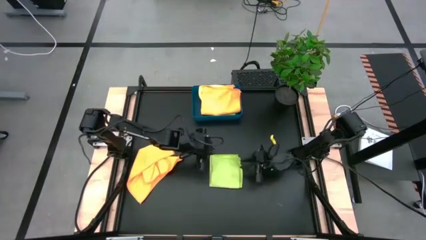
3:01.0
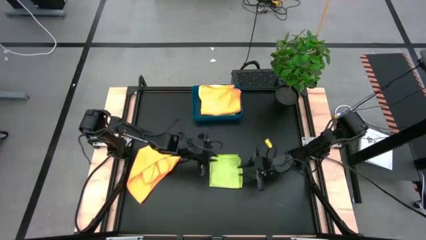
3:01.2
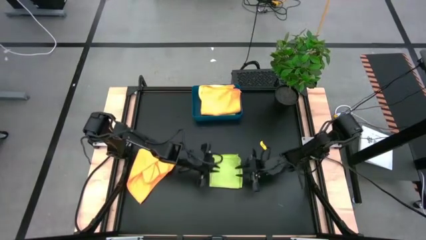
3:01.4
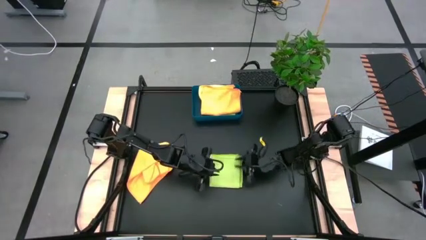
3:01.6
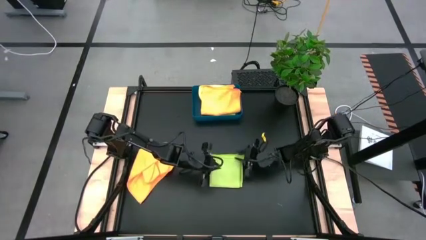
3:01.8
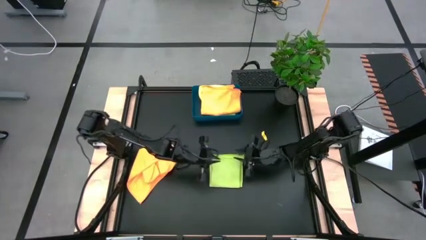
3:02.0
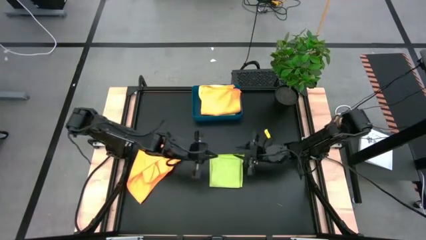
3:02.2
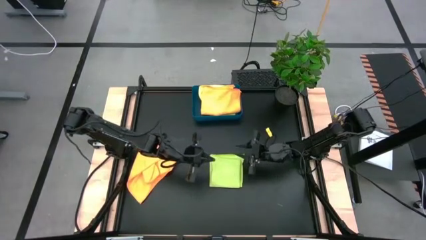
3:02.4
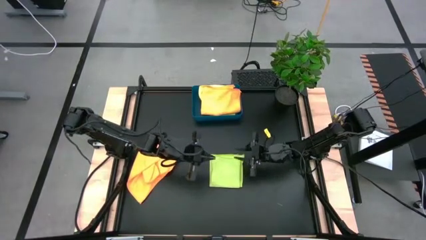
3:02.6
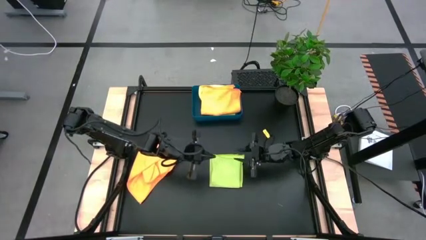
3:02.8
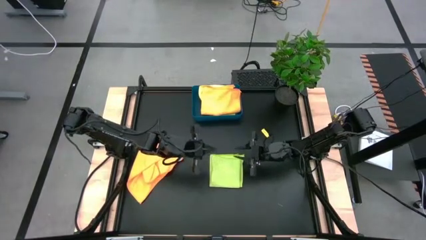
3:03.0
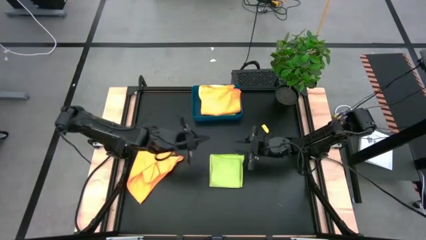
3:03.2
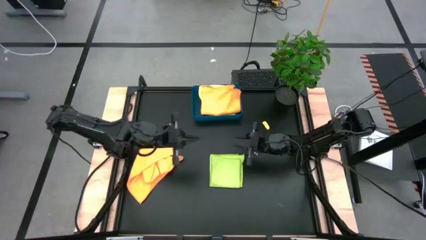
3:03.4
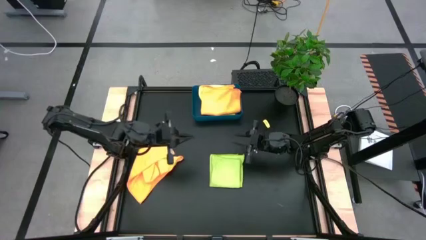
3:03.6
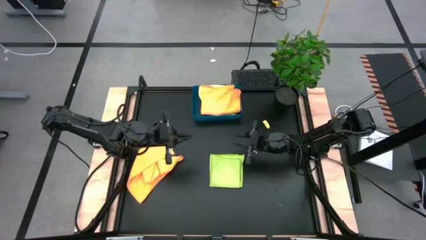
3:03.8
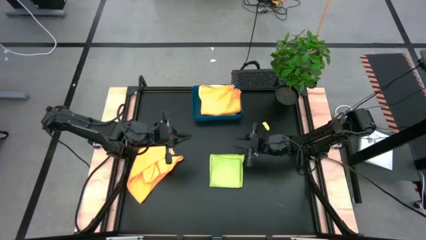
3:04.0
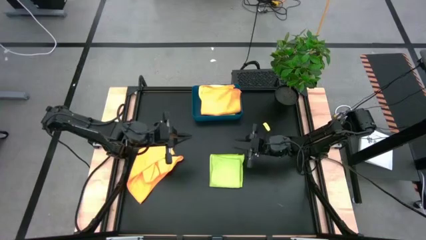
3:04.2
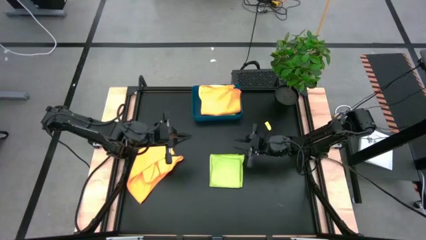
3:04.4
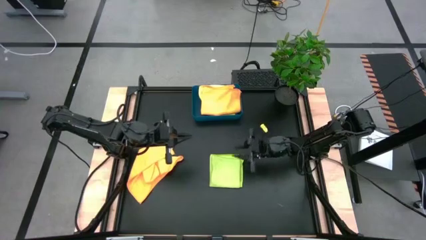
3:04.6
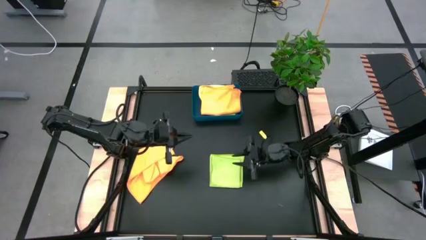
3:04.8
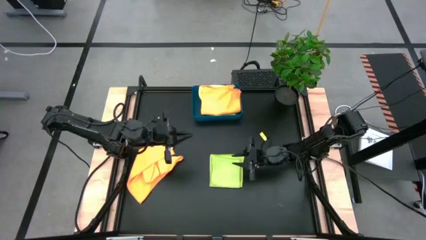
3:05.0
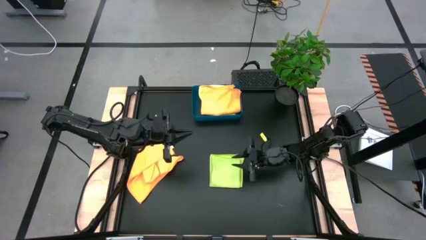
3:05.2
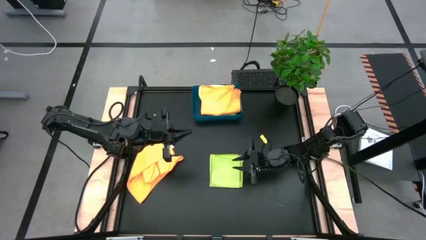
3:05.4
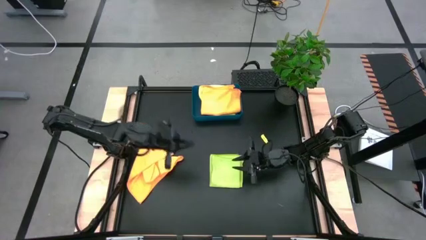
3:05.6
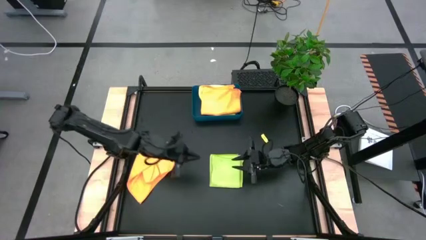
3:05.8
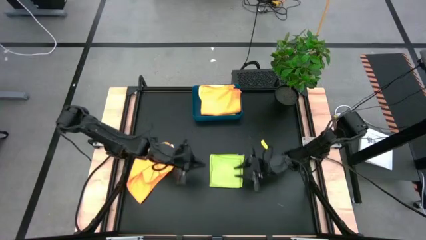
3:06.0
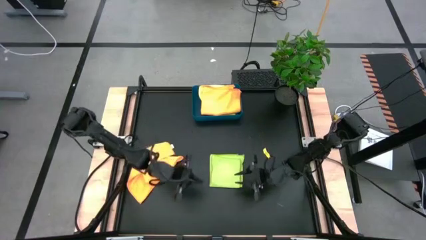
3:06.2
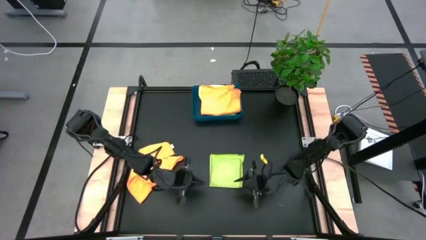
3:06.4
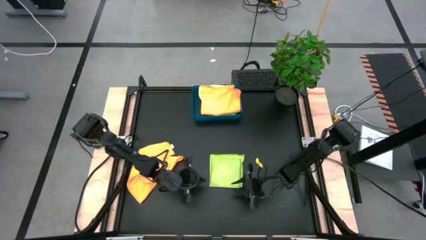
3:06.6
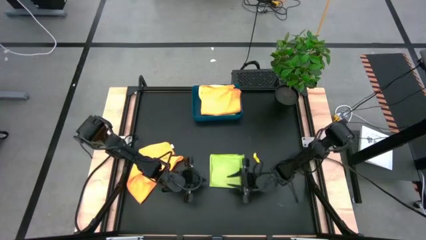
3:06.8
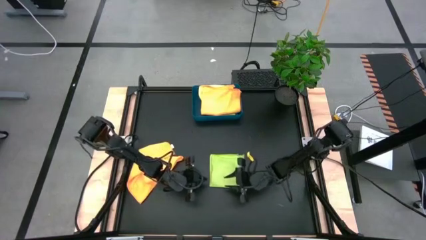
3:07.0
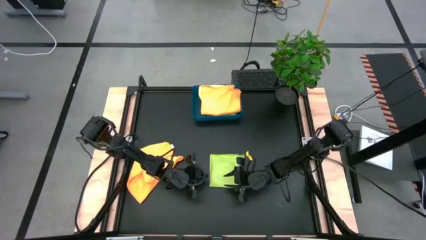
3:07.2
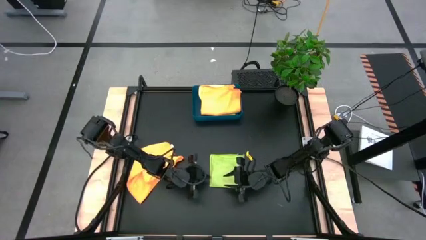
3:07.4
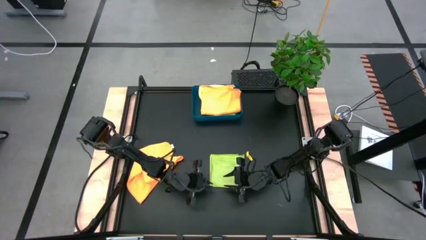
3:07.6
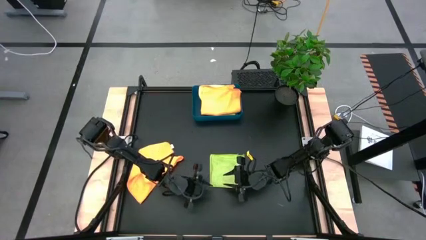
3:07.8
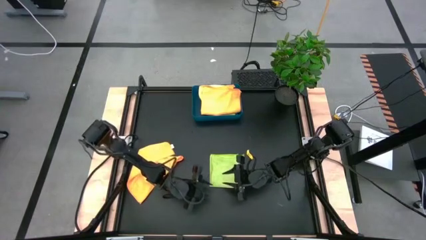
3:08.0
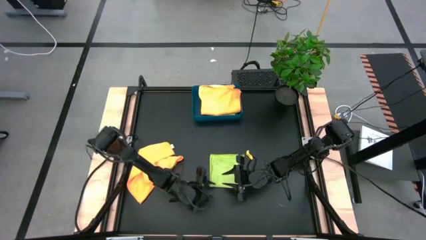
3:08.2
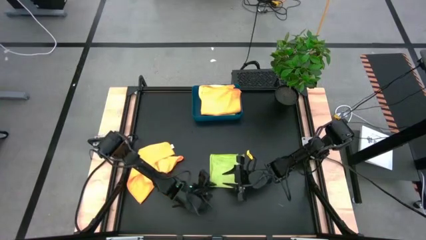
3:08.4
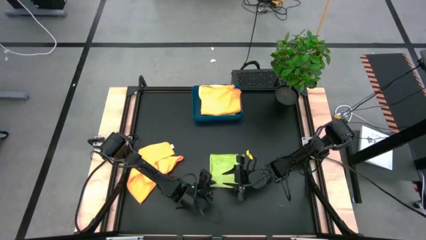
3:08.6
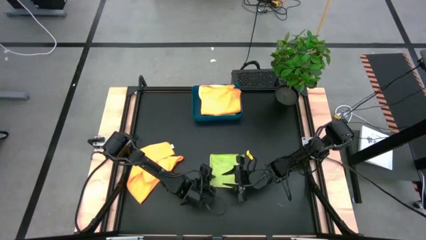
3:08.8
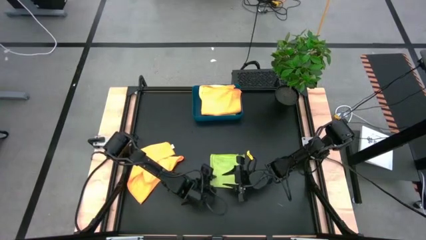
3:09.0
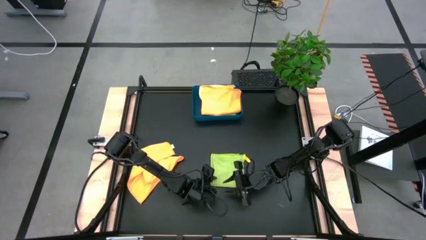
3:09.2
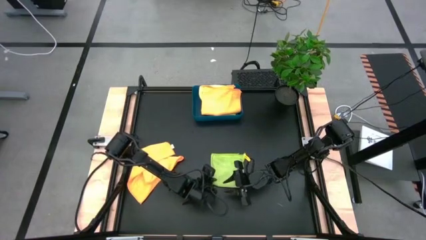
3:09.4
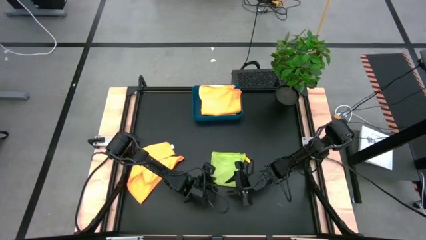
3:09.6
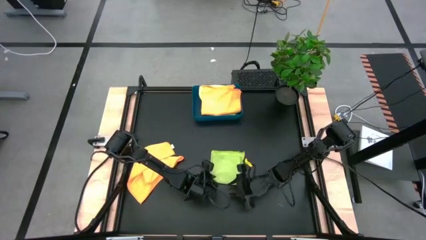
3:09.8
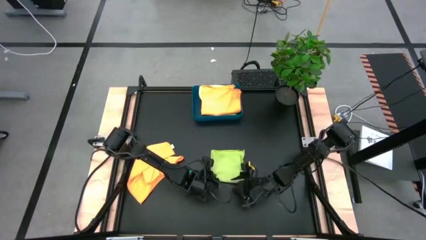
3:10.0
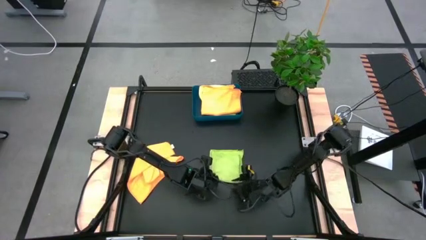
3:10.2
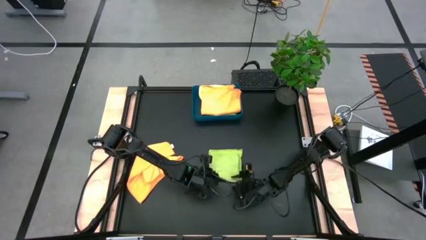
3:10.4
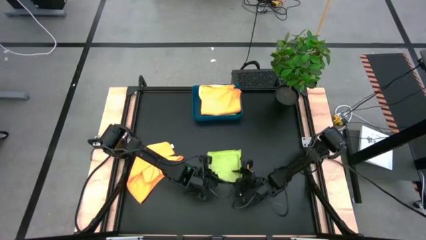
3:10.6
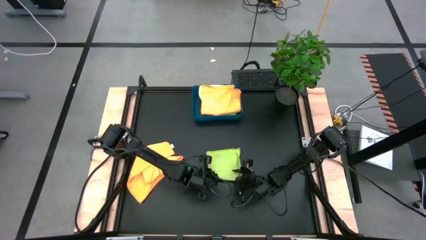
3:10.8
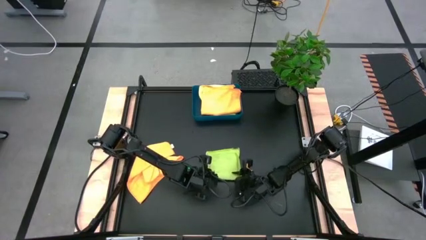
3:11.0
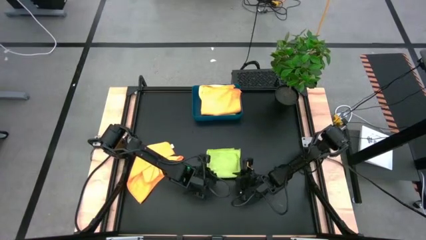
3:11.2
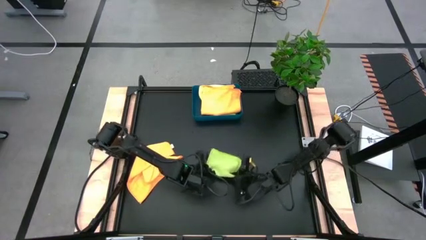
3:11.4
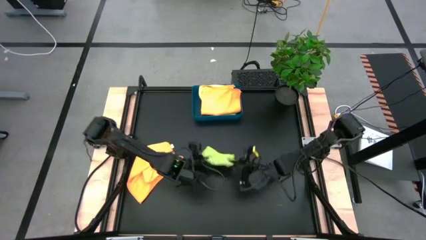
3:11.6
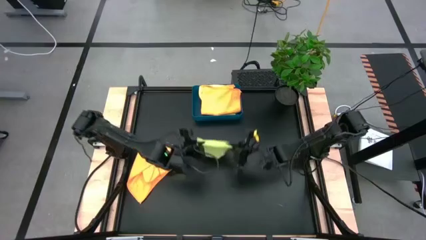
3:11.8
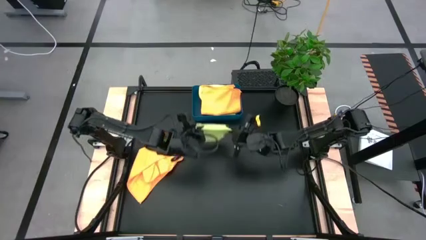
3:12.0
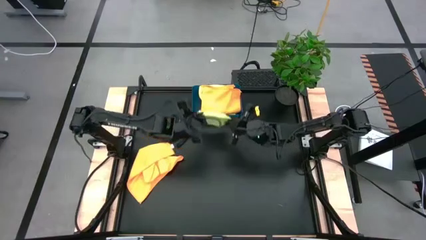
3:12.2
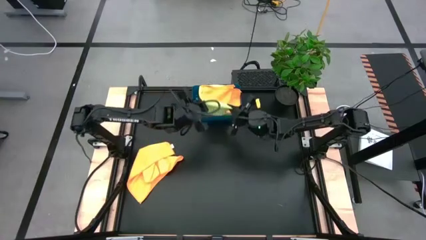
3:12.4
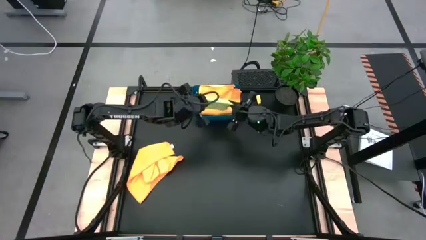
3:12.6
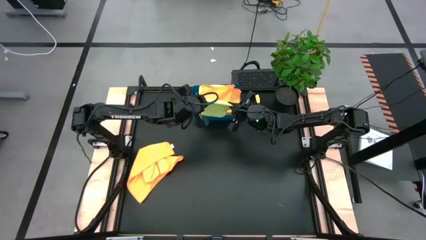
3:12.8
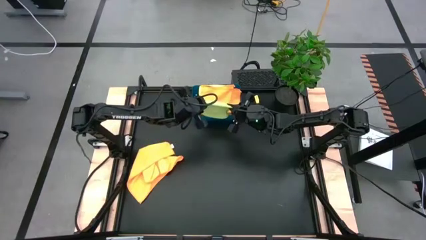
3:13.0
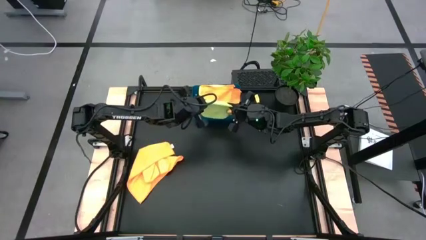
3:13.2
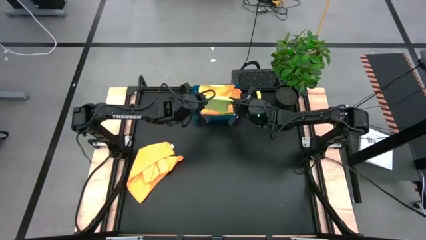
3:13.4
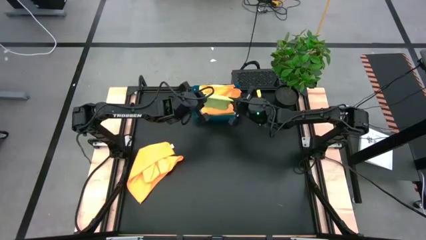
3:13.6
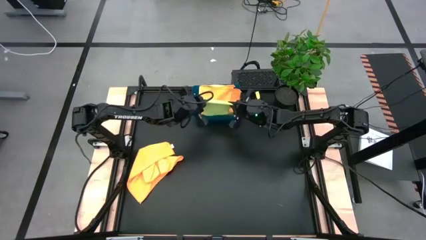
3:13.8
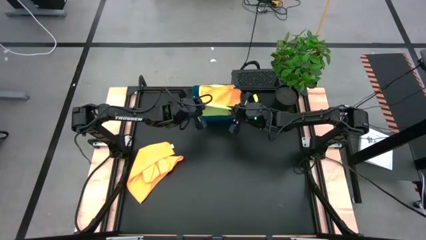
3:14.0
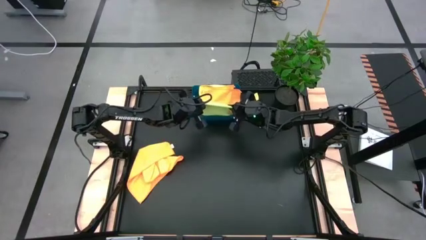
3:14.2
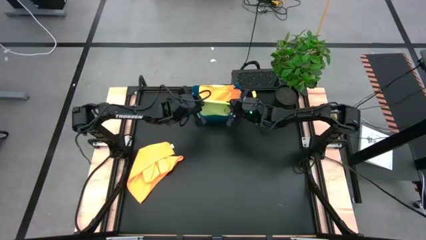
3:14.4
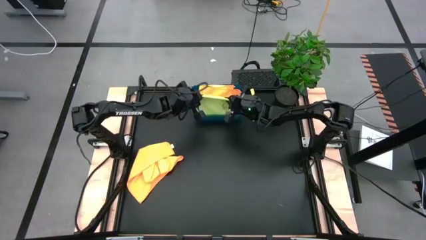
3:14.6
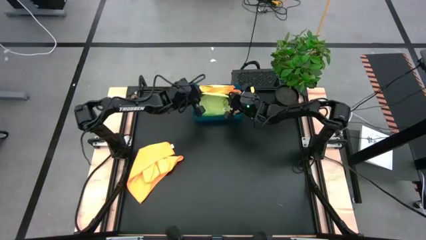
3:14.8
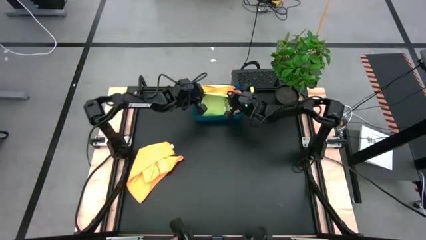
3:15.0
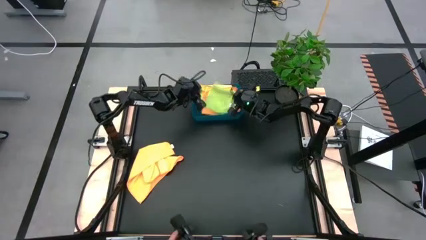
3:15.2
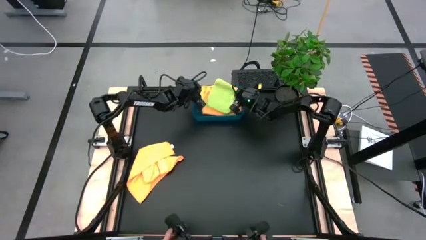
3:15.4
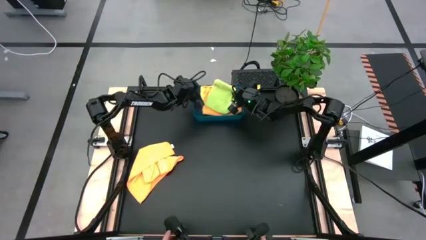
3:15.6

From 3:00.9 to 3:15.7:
Task: Fold microfiber towels
Stack the green microfiber cloth on top of the orange microfiber cloth in the blue bin
